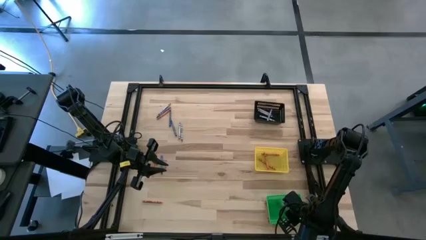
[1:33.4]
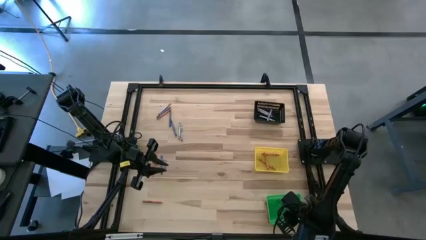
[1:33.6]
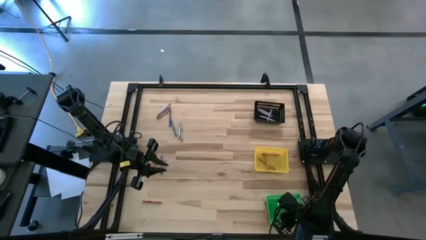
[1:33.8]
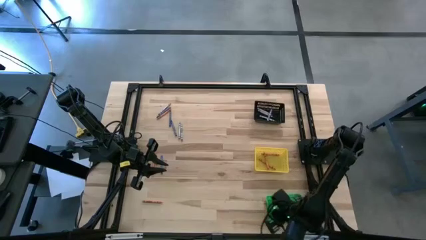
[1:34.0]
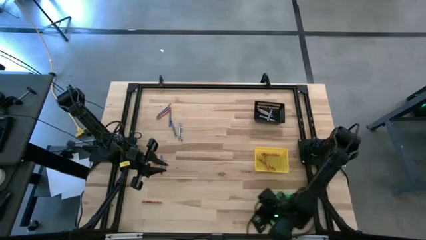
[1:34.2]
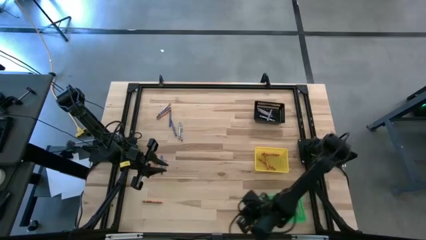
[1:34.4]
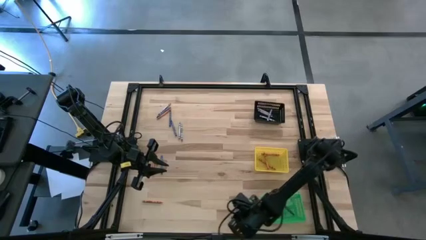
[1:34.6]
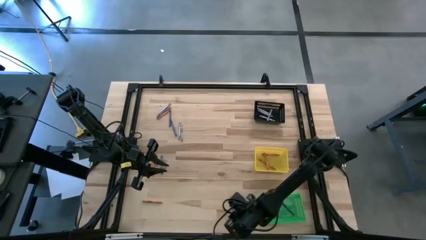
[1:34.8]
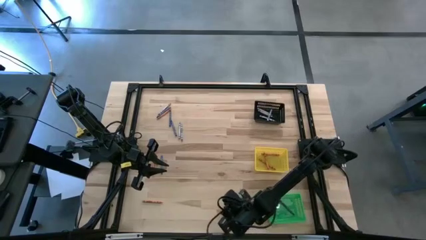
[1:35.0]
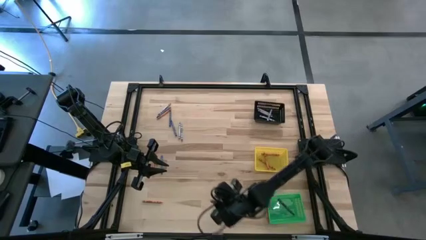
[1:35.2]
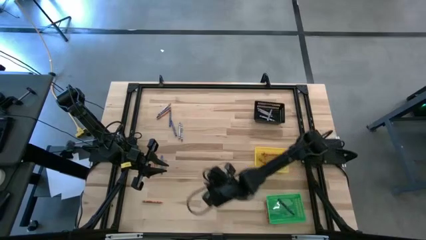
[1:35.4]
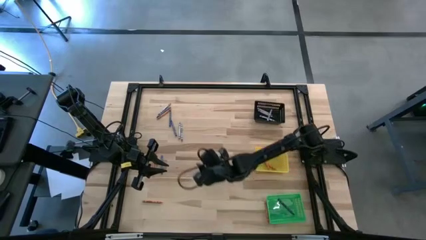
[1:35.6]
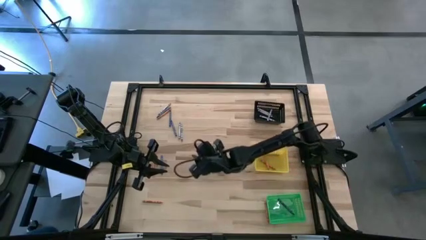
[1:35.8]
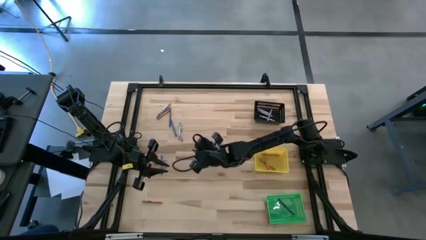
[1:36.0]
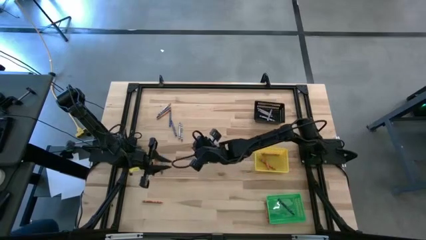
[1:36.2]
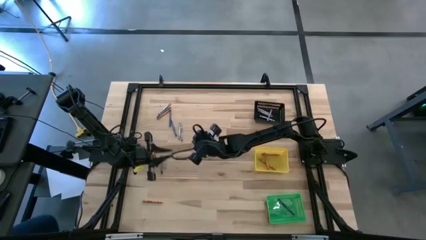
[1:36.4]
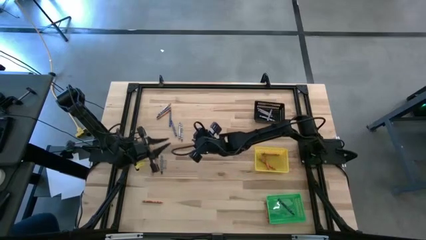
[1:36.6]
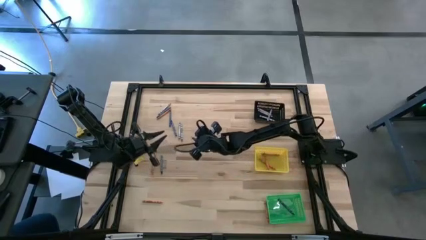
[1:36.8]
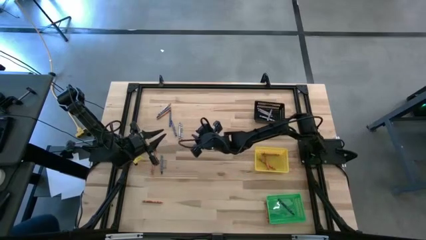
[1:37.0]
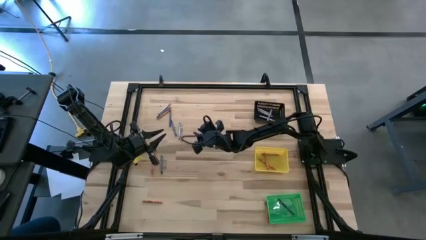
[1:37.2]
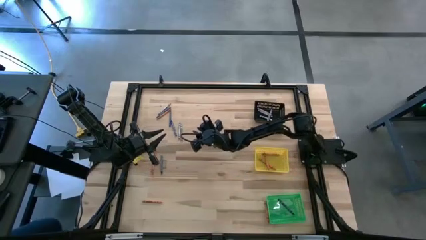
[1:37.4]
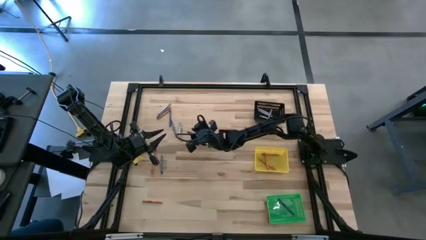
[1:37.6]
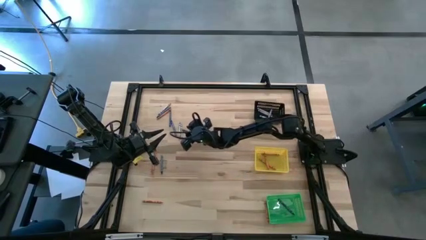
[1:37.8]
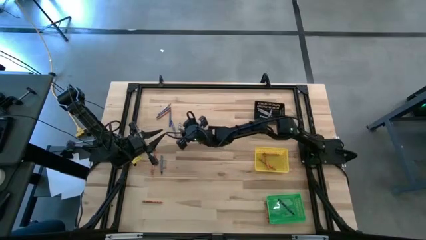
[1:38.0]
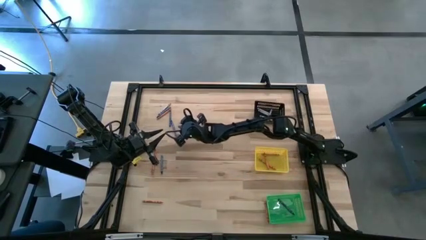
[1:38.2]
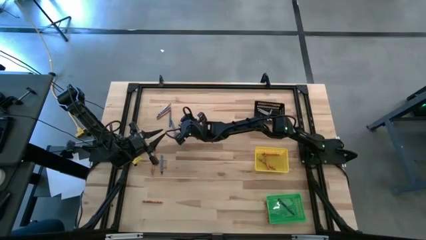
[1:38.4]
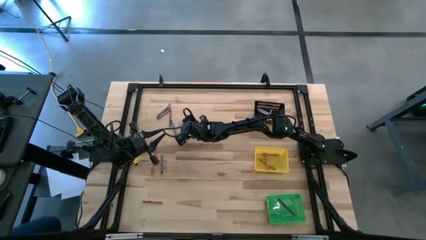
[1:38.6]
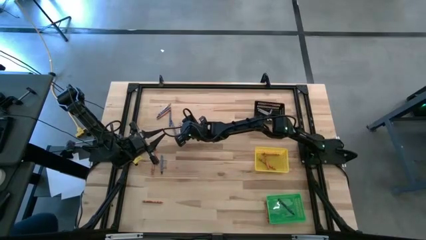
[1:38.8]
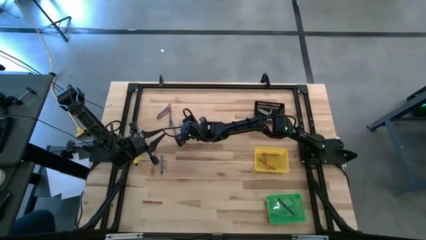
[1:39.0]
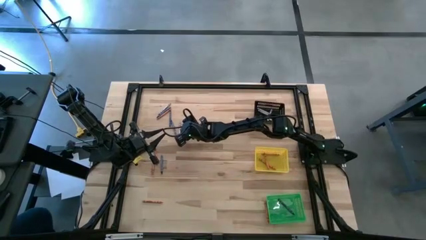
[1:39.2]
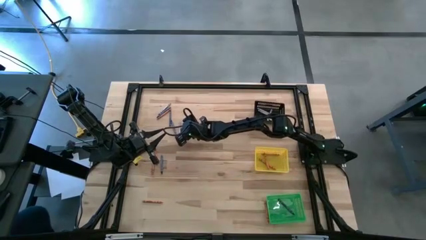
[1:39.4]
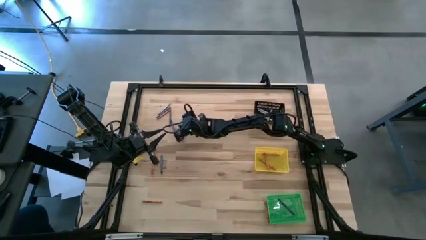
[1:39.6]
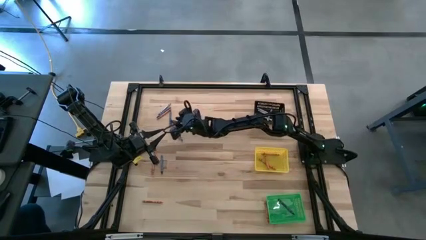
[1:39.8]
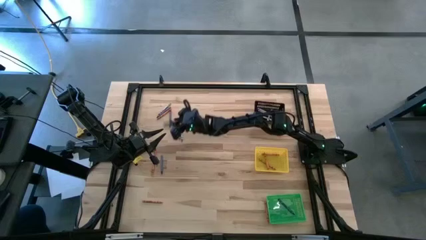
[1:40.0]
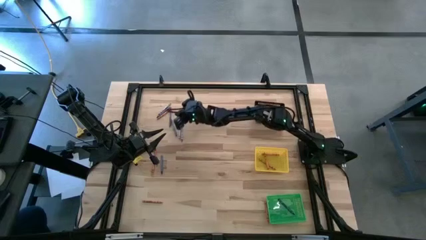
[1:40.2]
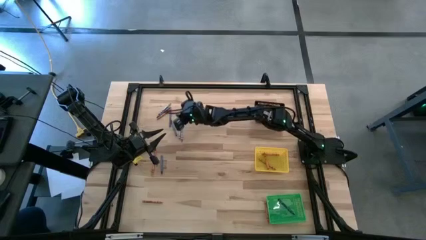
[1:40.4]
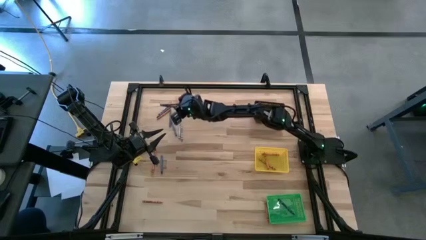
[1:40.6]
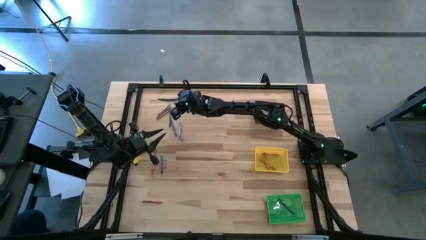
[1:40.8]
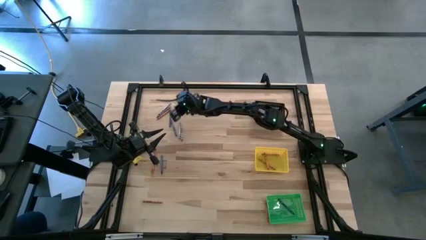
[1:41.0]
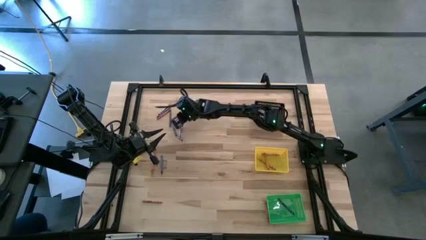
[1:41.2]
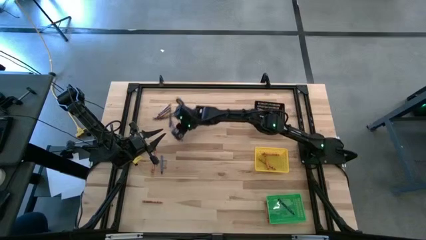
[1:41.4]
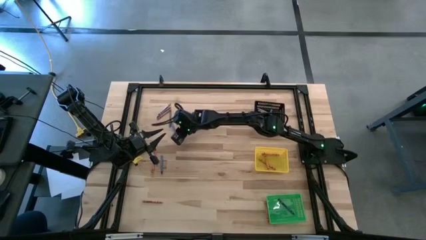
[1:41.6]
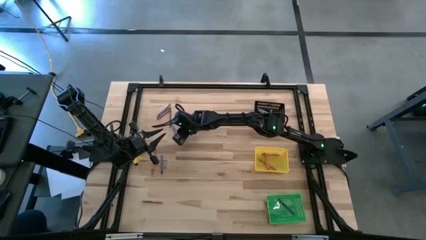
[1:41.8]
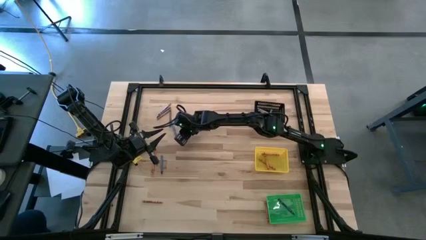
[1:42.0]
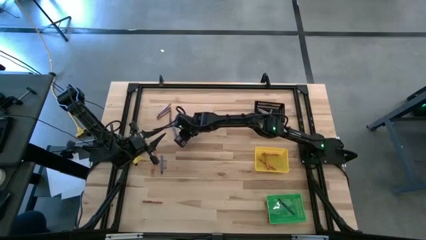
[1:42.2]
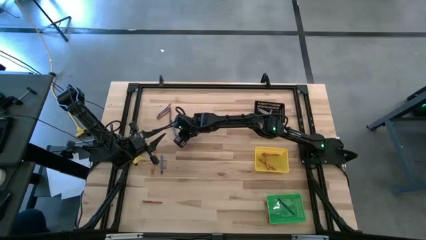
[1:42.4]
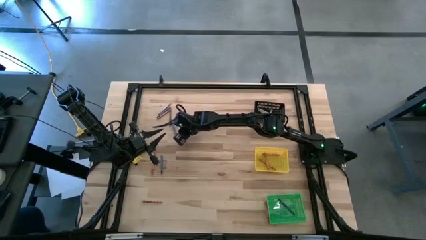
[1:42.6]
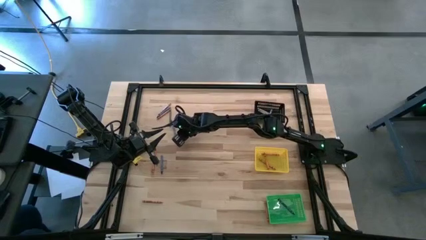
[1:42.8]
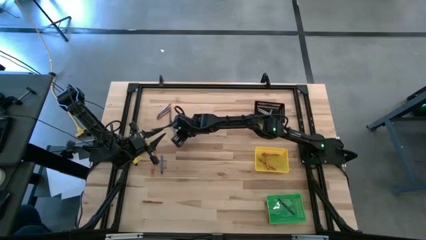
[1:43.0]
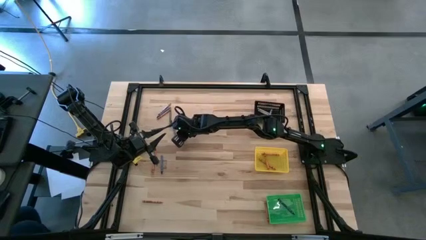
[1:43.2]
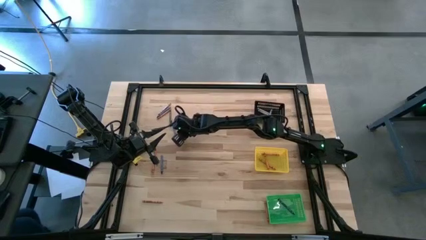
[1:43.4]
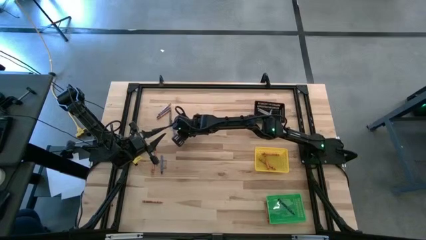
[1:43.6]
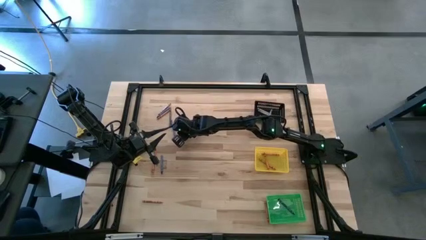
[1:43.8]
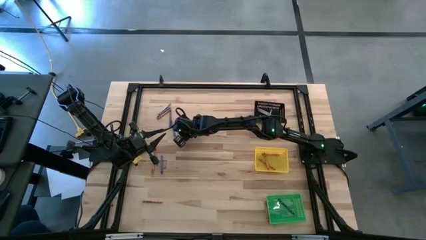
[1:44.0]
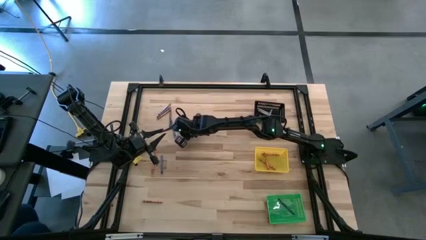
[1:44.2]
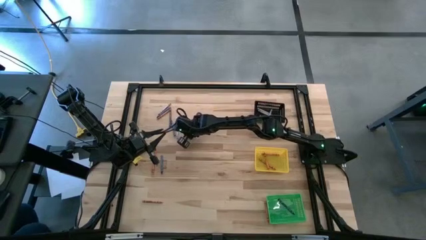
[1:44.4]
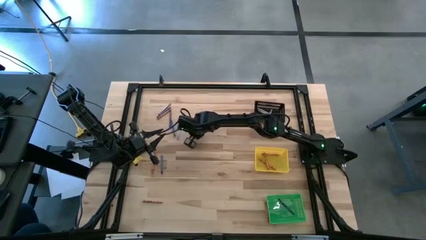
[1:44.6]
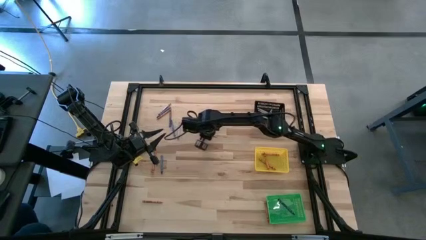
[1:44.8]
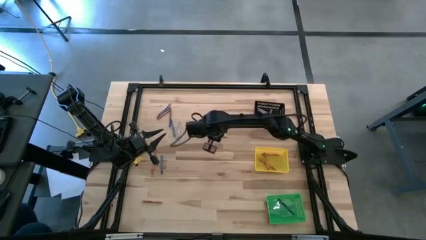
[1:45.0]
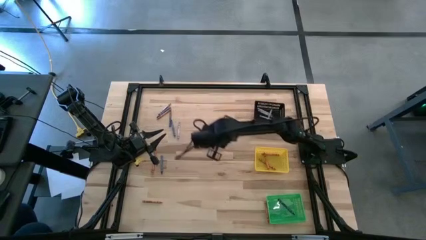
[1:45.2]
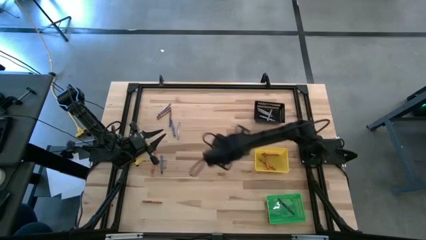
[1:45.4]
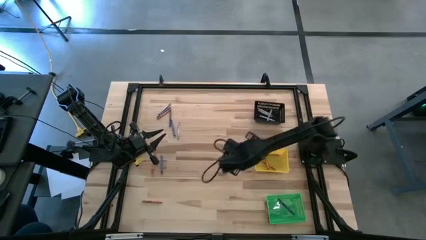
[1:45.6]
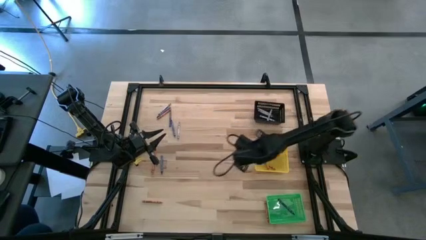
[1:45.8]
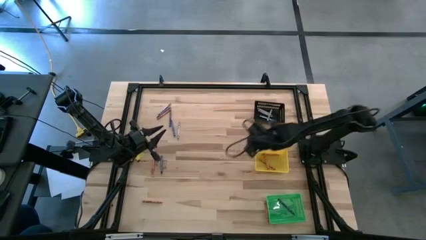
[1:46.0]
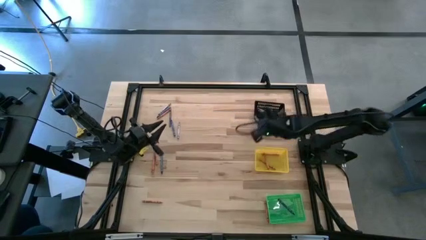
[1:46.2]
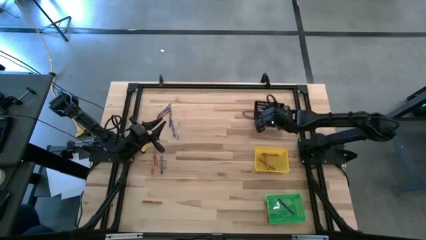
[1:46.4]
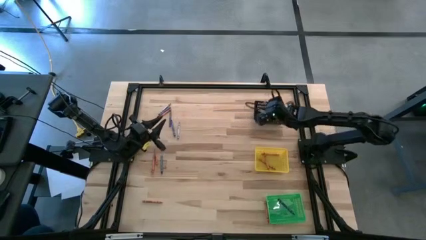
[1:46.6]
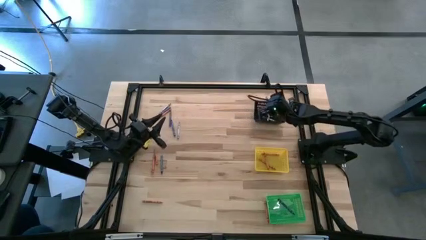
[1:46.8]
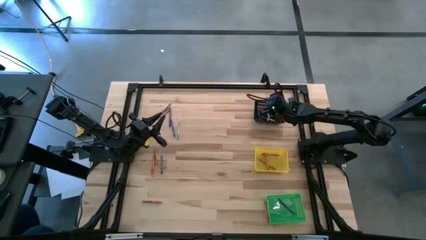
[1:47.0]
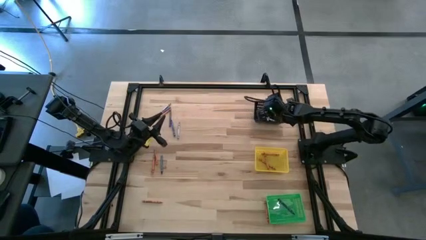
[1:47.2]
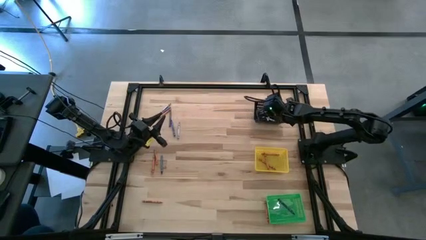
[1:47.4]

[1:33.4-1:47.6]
Task: Sort crayons
Put the gray crayon into the black basket

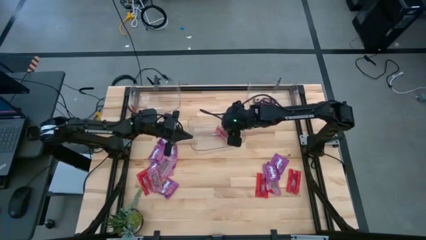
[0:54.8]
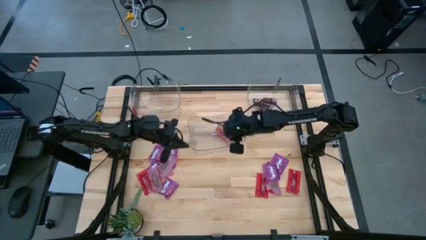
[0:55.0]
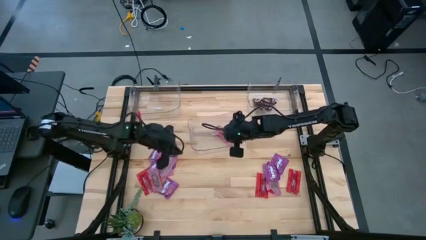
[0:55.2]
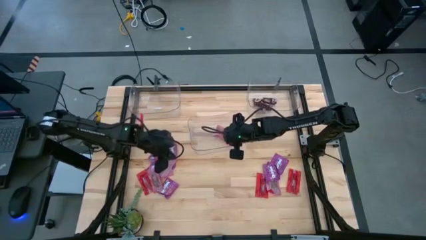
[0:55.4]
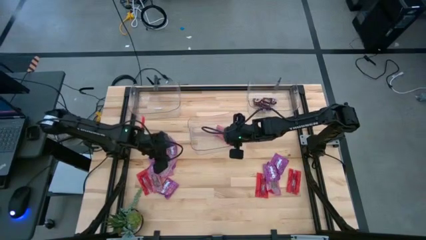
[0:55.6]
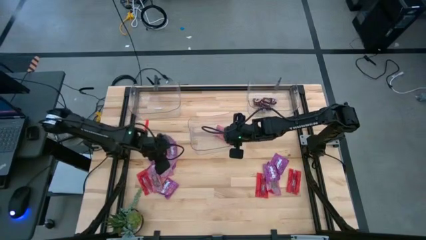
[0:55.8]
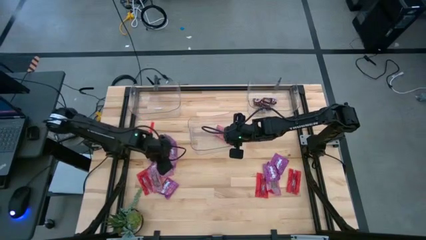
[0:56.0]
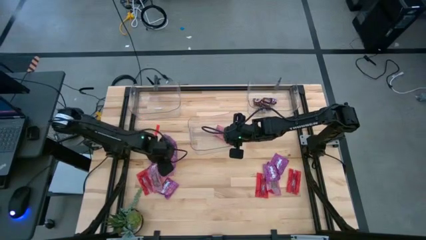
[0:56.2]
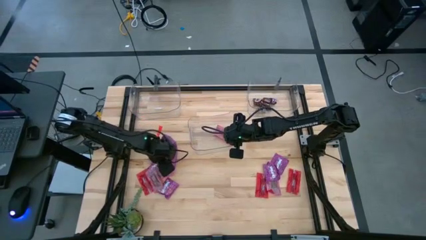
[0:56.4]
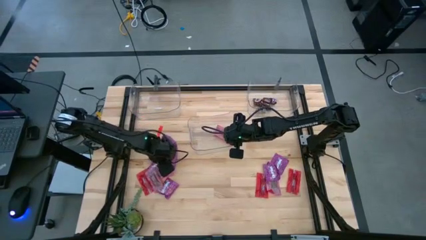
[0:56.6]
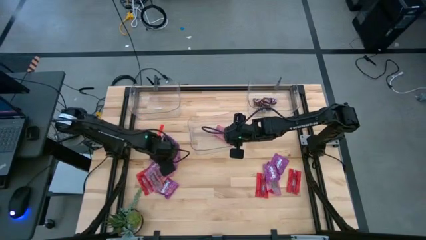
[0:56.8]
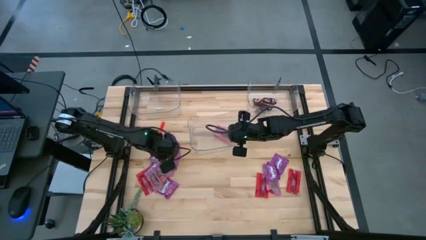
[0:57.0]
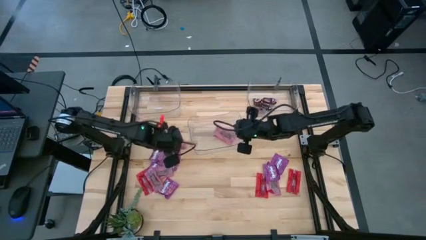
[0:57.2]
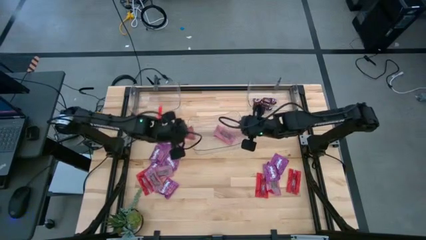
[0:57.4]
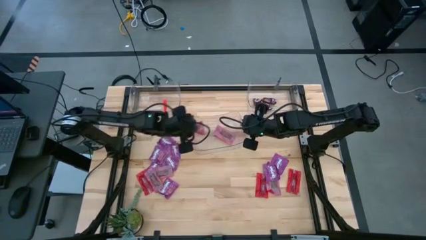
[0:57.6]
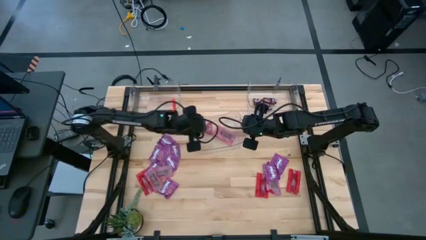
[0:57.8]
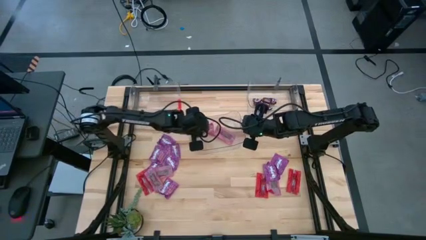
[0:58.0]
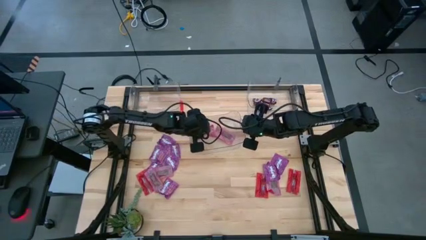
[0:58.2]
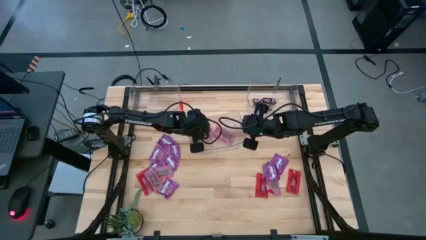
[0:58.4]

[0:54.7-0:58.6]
Task: Sort candy
Put the red candy pack into the bottom transparent bin
